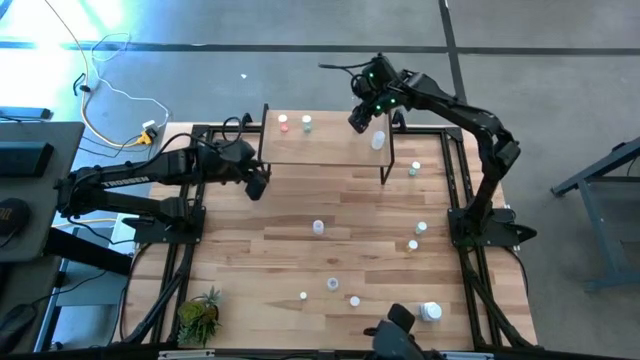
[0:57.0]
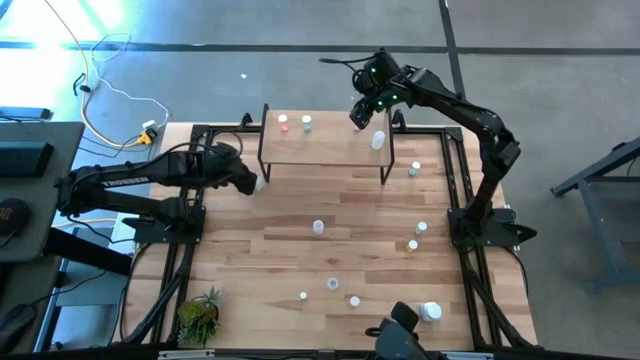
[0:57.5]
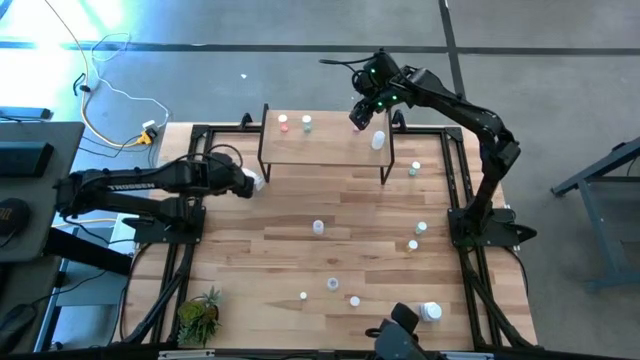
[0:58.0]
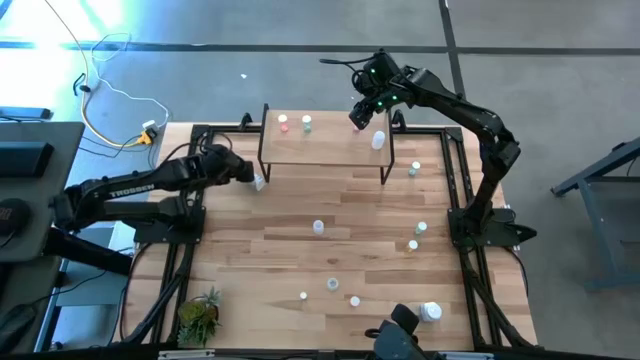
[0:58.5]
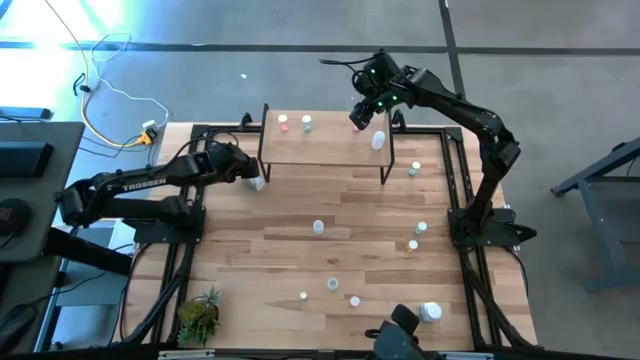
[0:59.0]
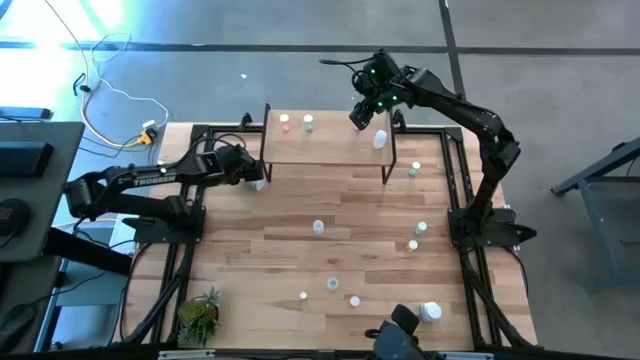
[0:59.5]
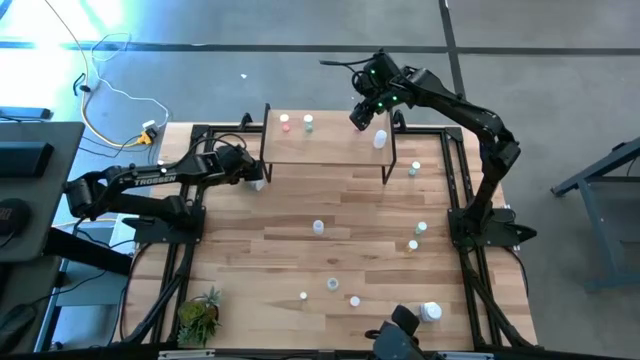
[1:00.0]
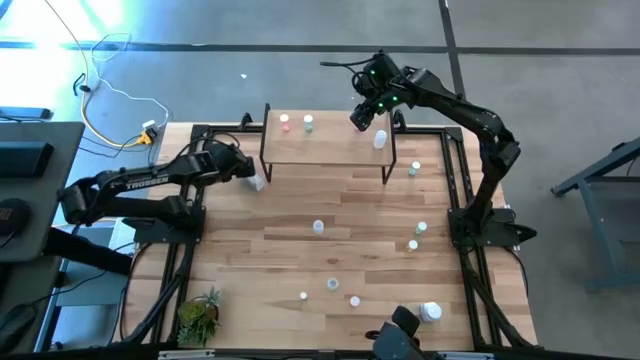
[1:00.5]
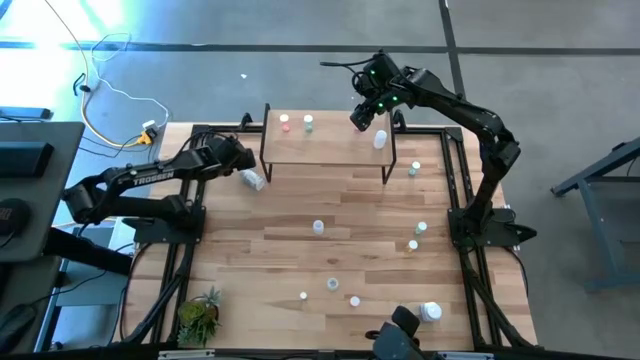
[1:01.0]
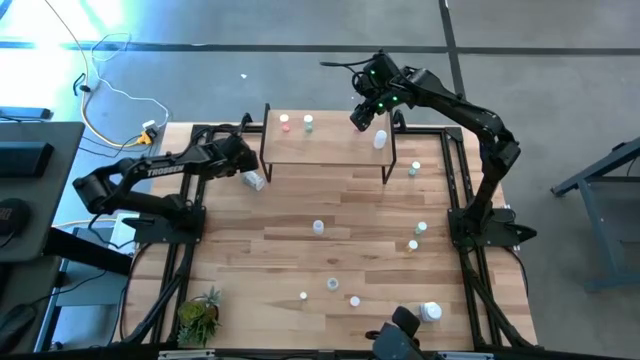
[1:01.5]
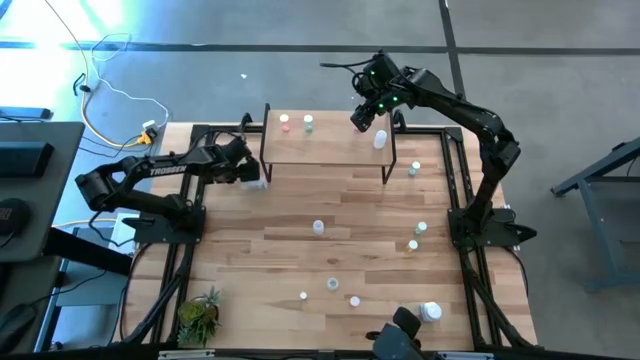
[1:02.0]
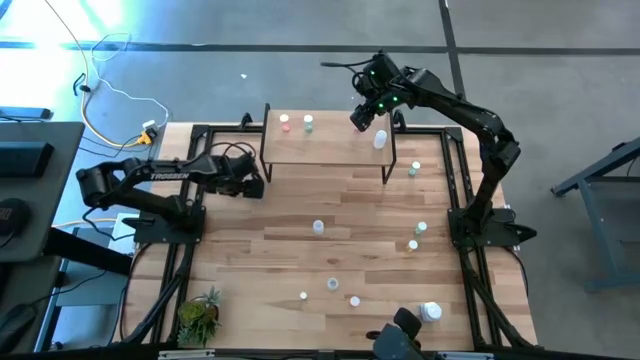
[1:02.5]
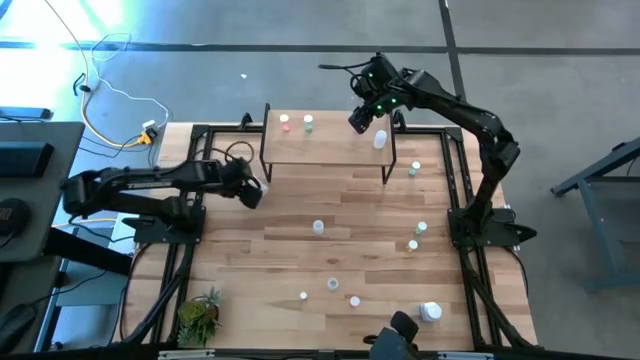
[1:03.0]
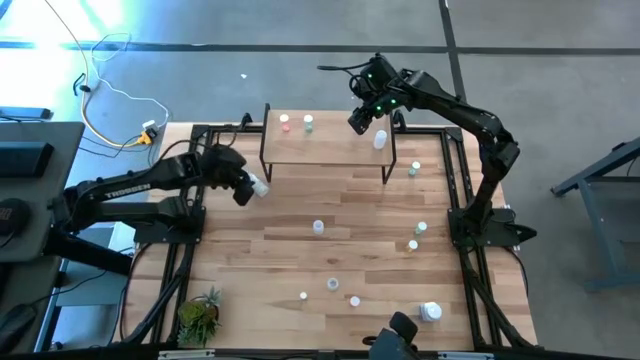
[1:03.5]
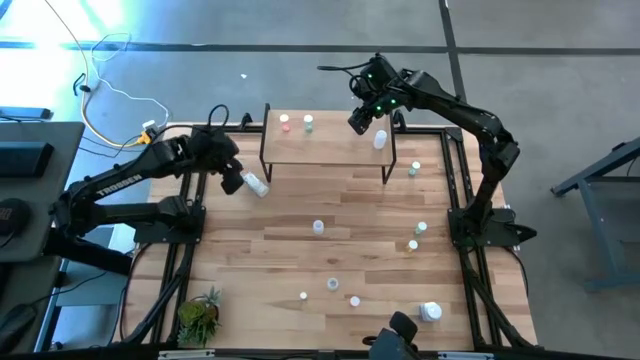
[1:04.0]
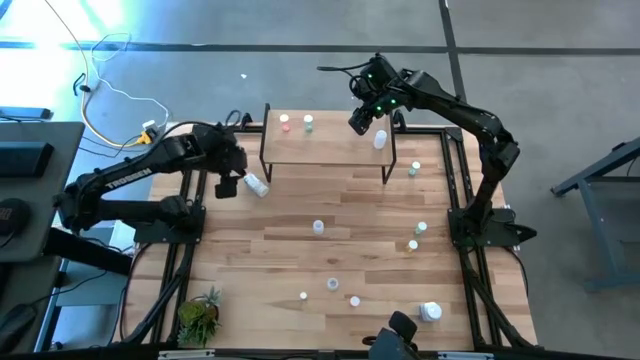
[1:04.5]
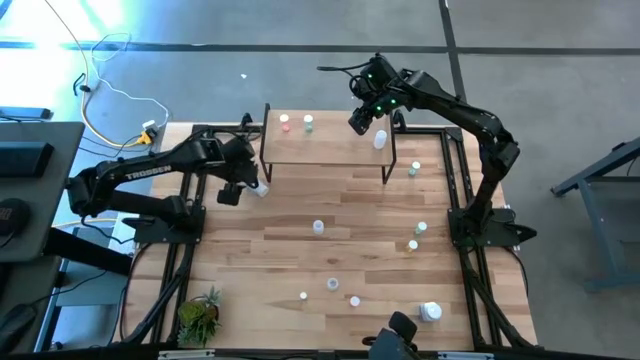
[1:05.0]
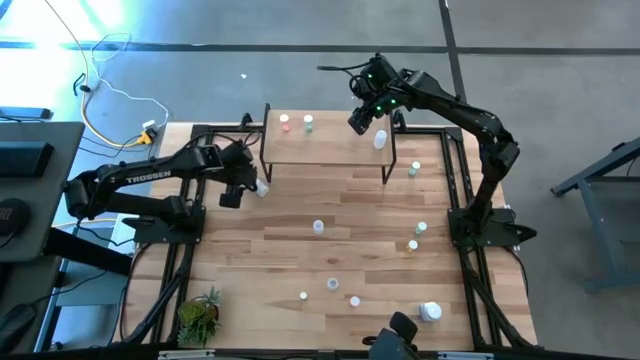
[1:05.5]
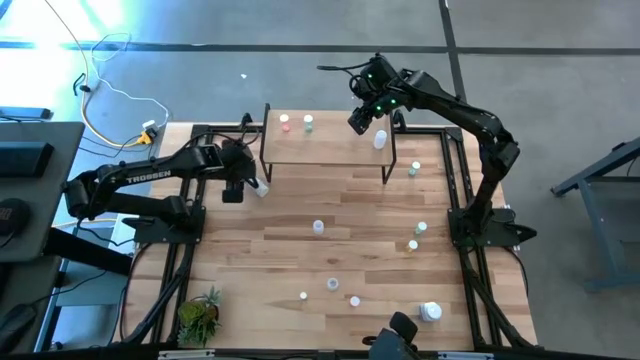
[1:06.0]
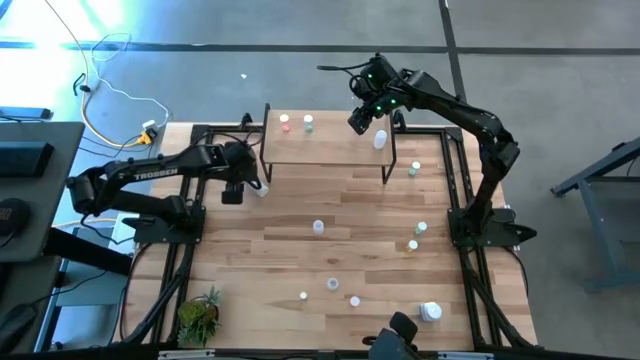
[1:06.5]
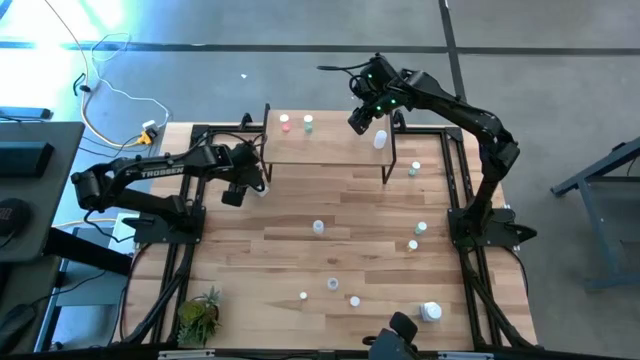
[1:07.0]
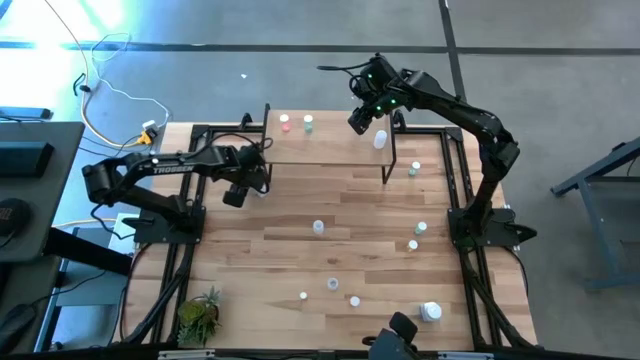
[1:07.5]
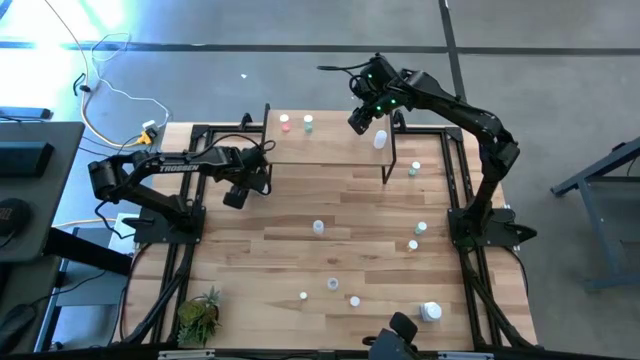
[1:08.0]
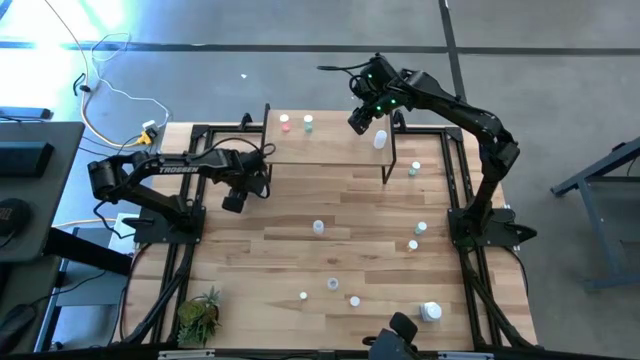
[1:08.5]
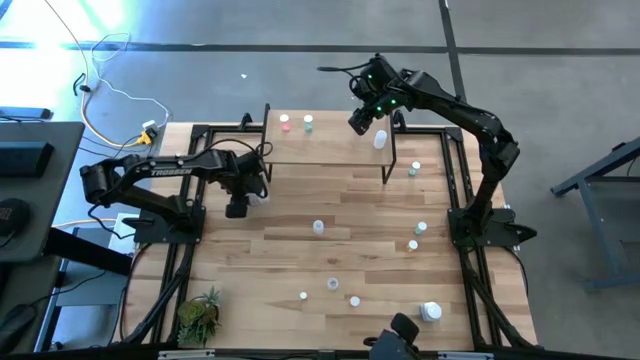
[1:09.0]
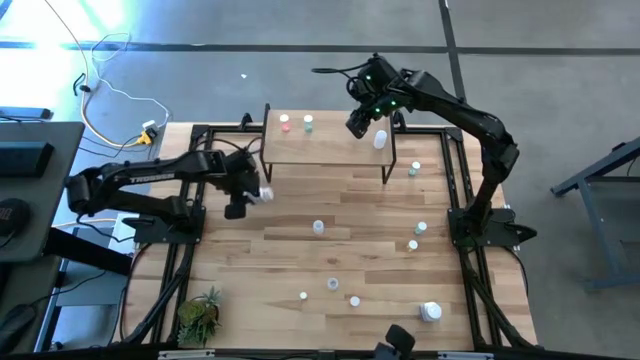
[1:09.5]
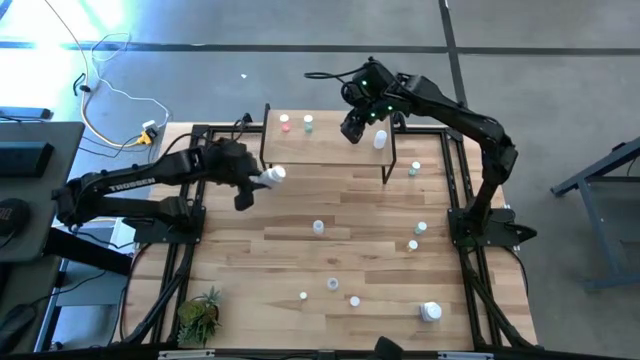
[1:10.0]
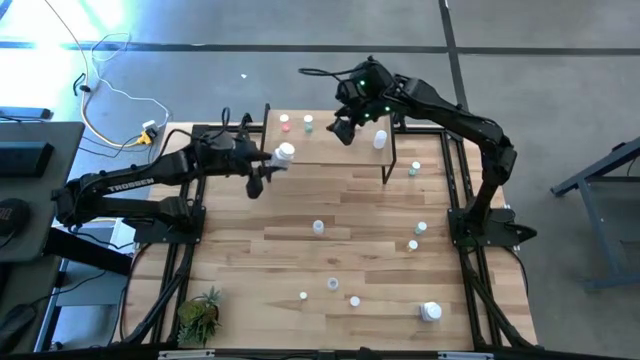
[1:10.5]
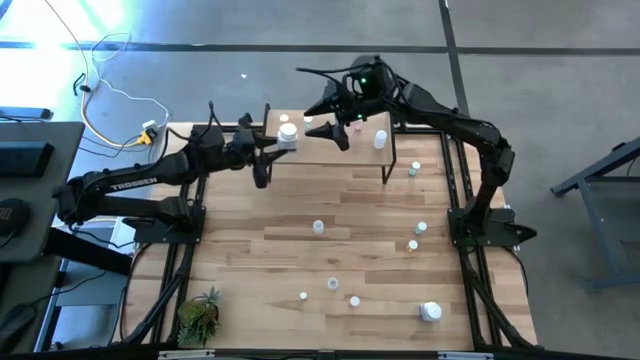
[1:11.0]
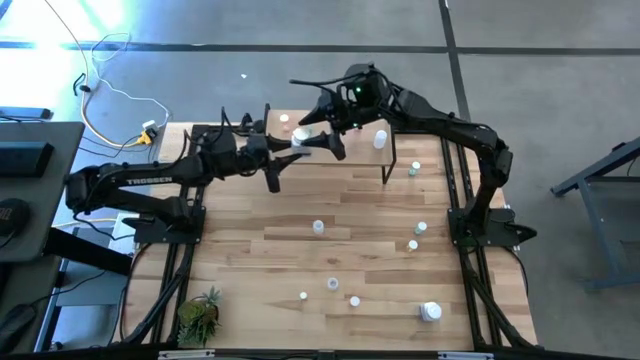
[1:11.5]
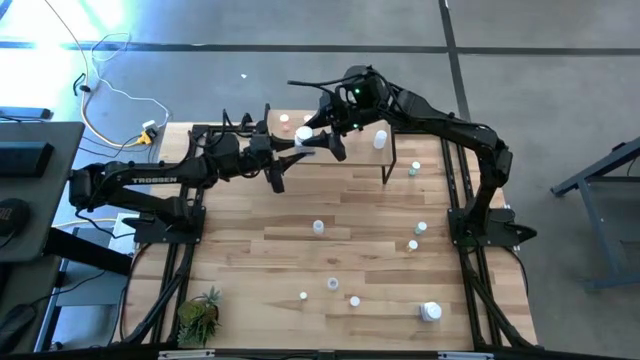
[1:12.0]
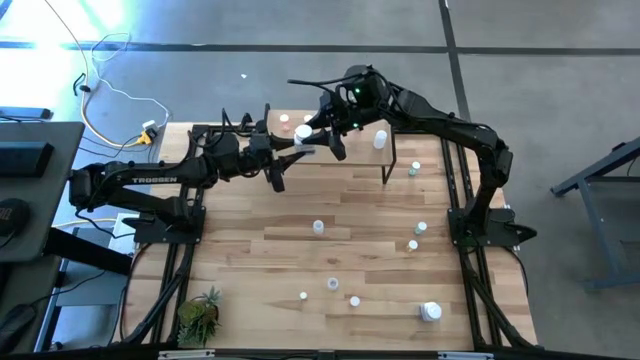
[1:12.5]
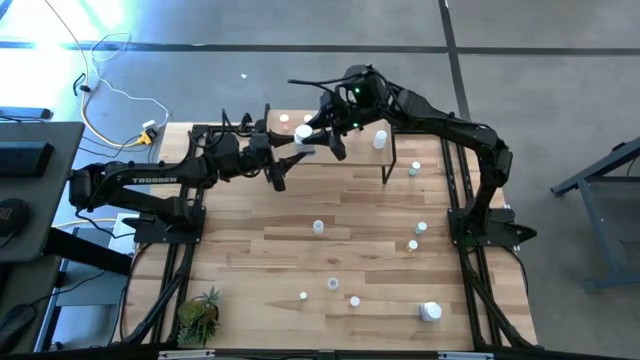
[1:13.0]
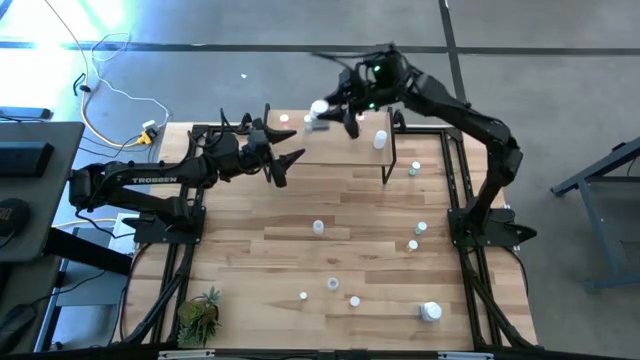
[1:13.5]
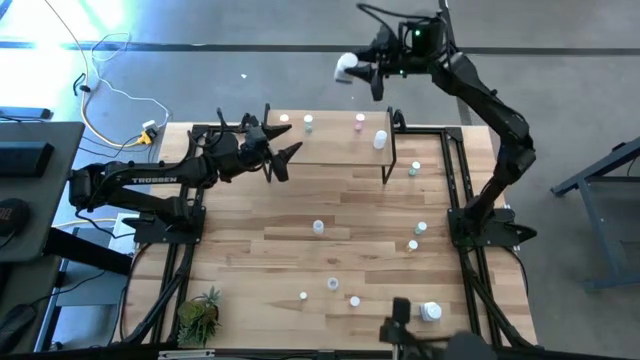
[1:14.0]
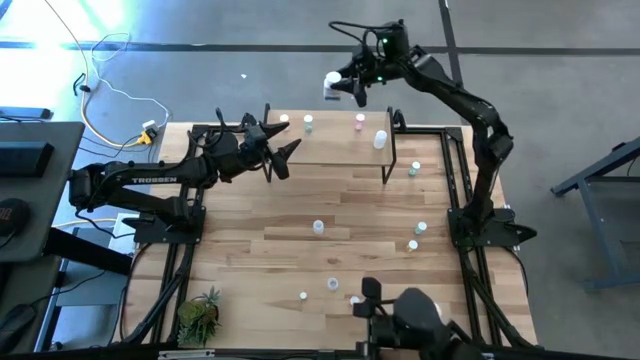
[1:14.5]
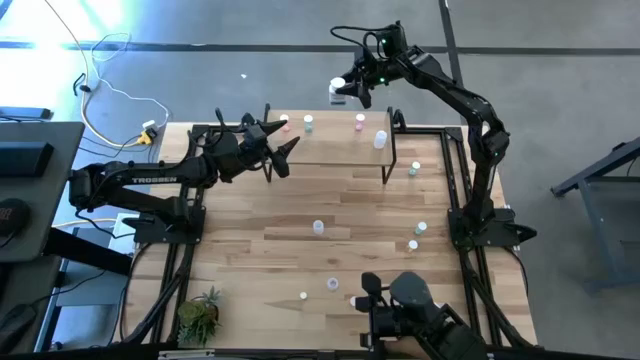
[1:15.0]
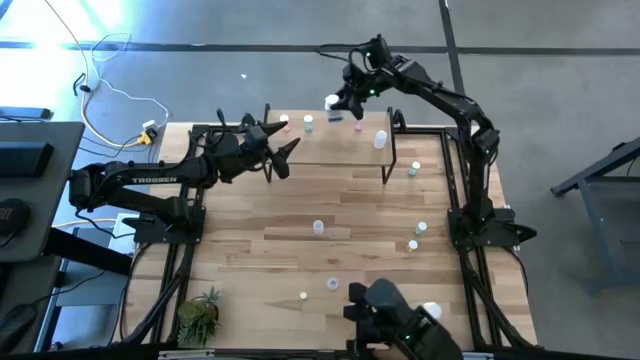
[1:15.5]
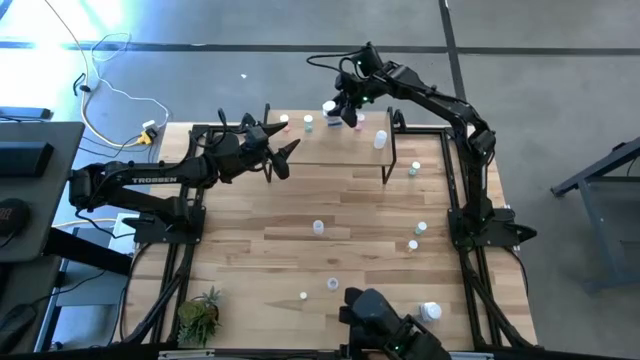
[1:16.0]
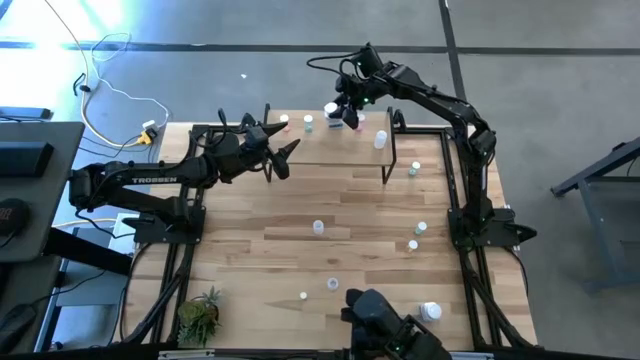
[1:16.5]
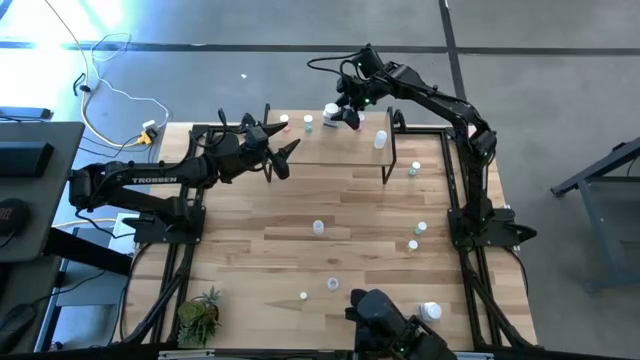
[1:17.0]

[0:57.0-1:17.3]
Task: Pick and place medicine bottles onto shelf by color
Put the white pill bottle on the shelf

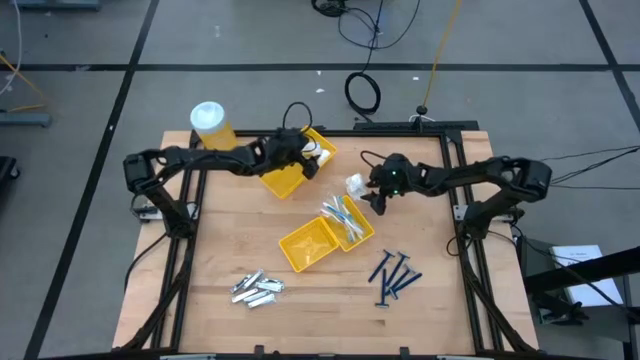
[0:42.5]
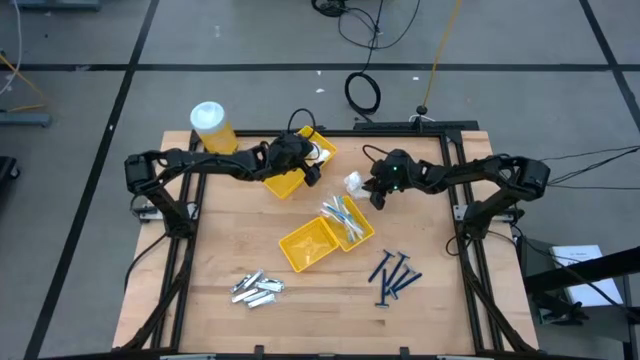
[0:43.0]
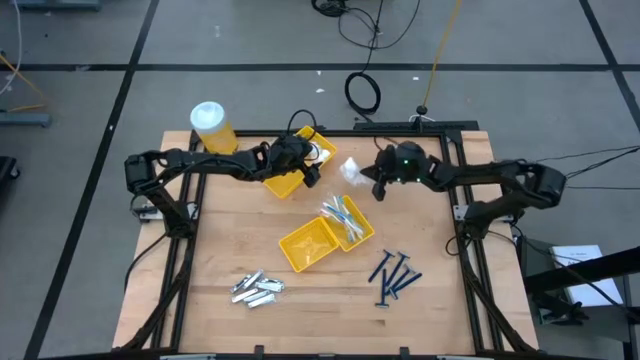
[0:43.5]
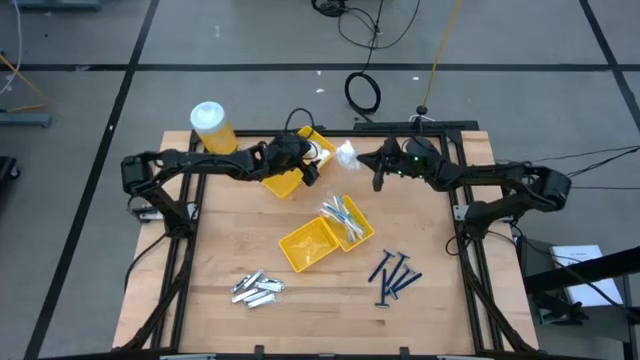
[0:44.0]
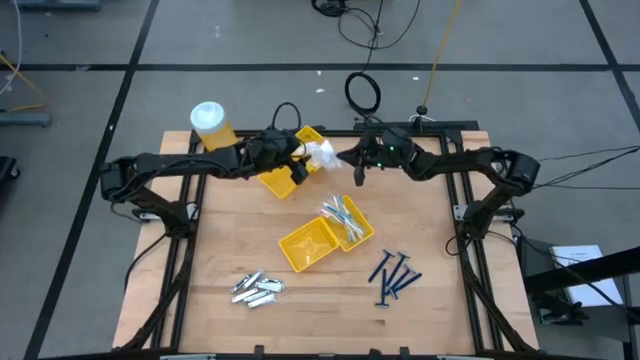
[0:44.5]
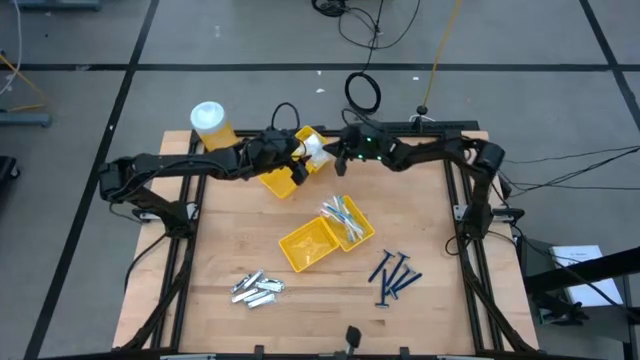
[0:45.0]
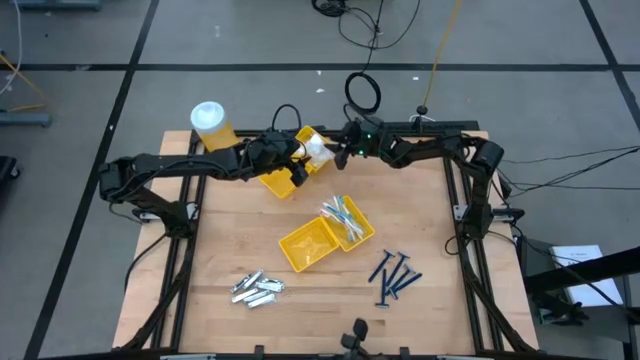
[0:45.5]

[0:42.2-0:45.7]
Task: Pick & Place Travel size toiletries
Put the cotton pack into the top right yellow basket
